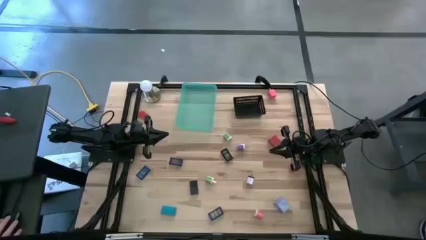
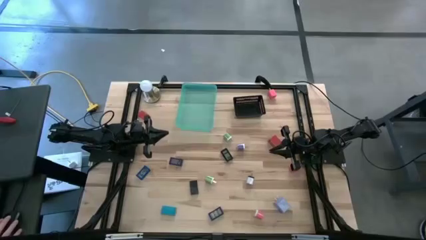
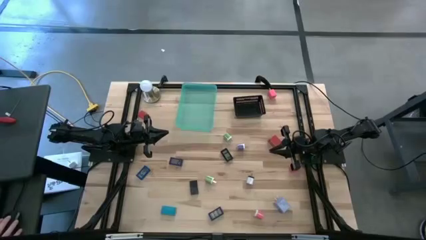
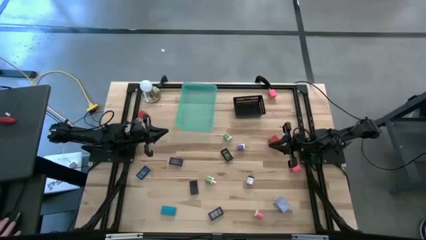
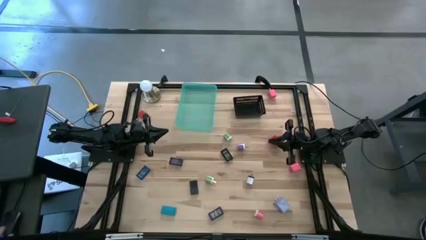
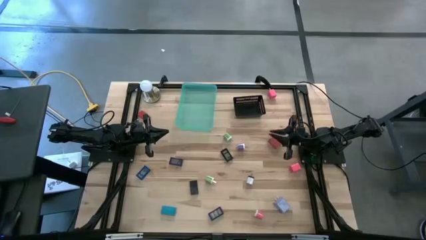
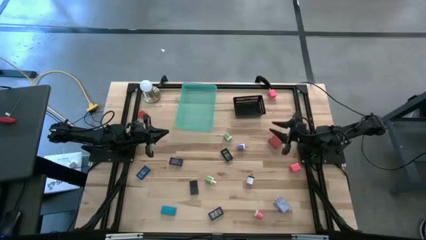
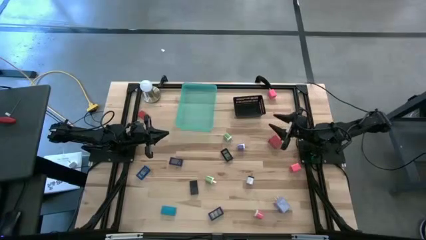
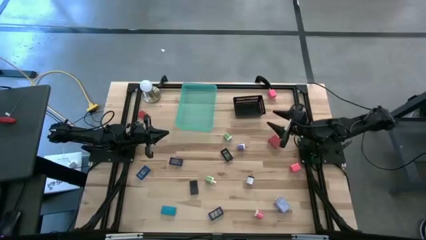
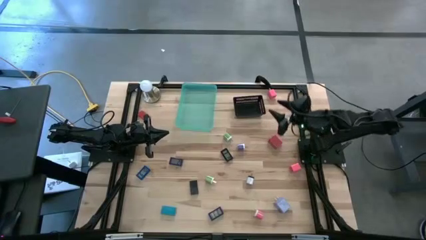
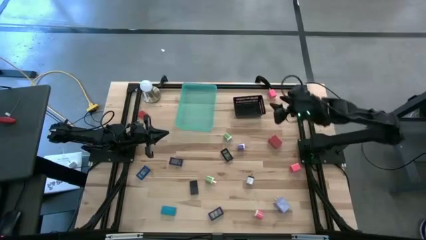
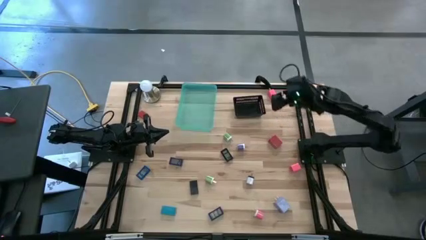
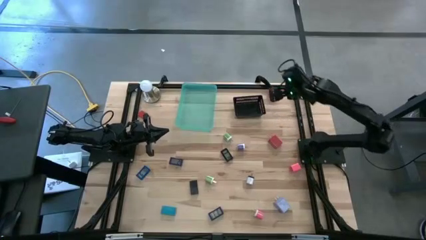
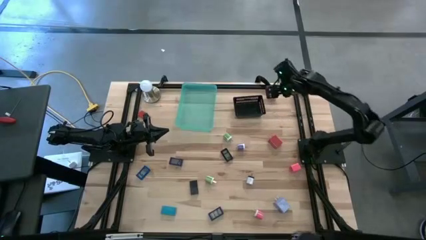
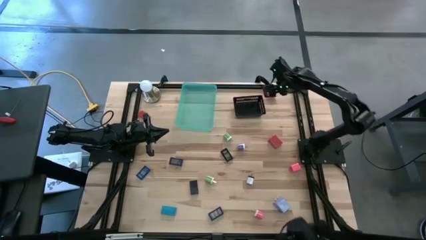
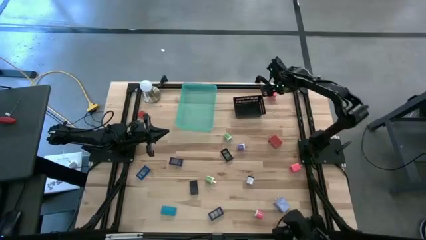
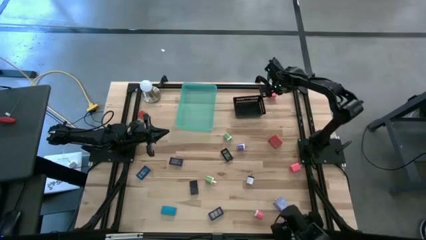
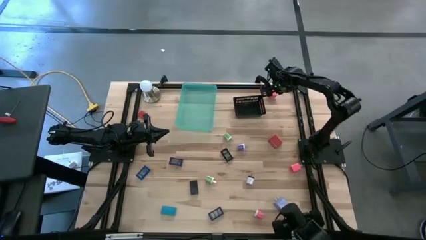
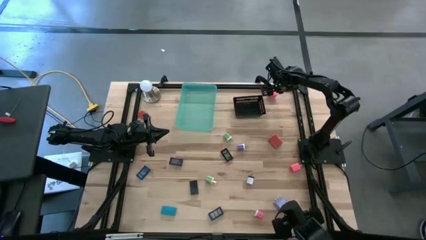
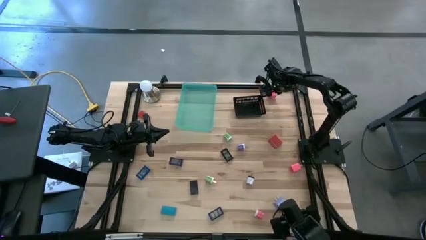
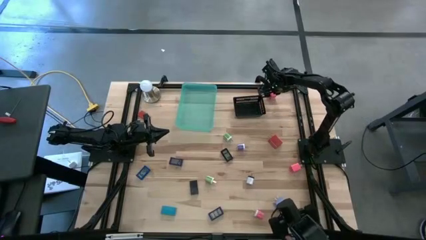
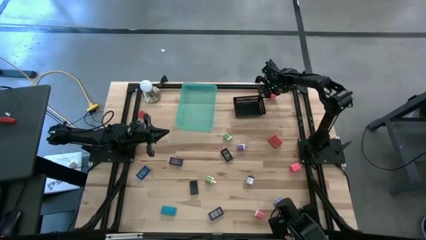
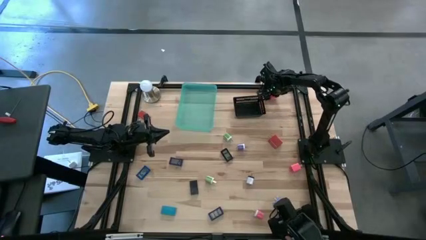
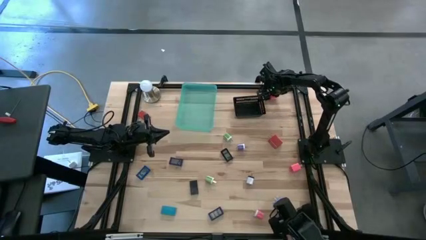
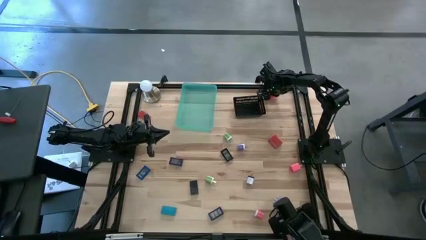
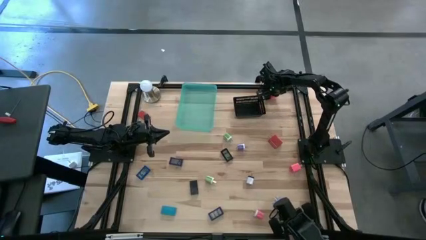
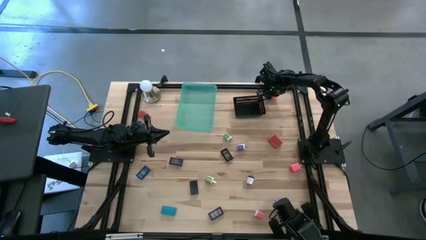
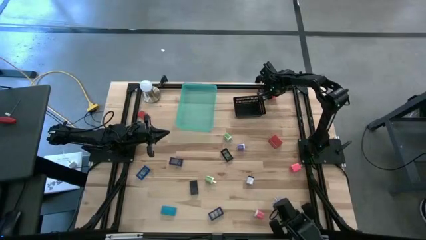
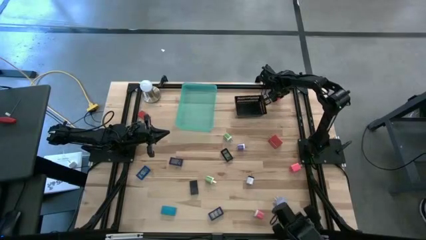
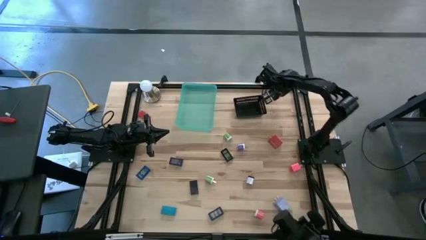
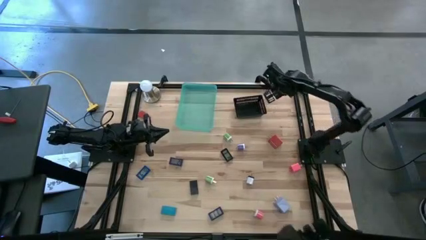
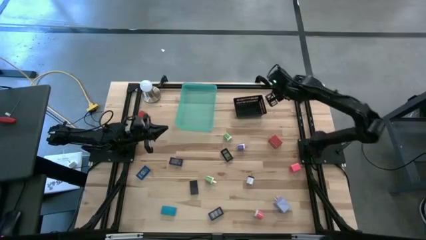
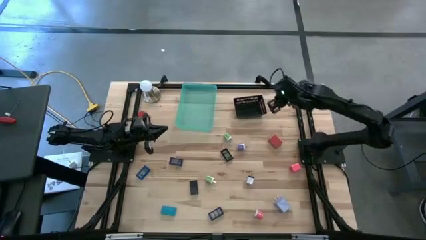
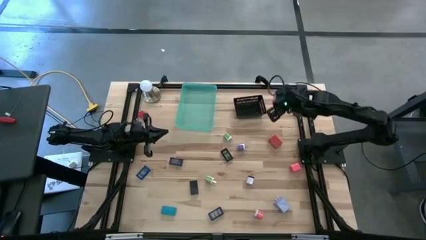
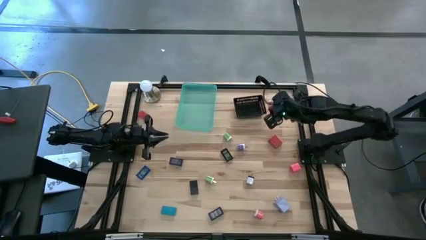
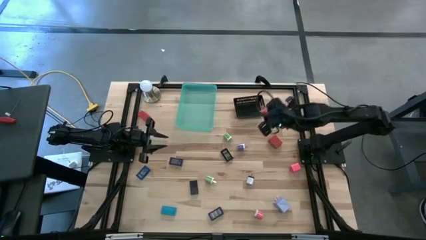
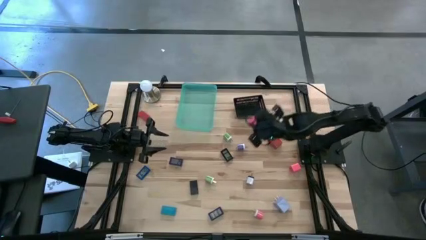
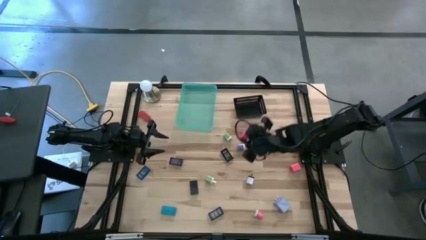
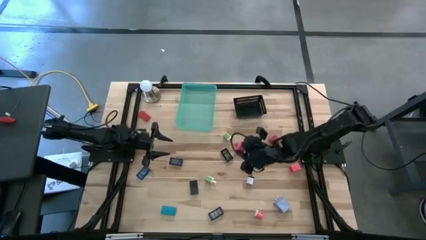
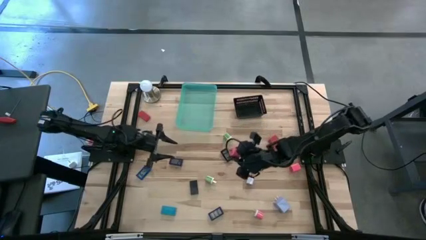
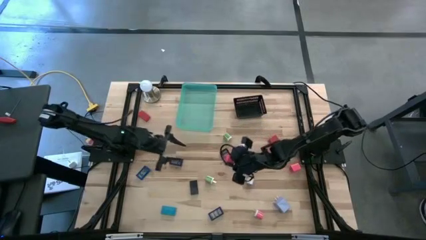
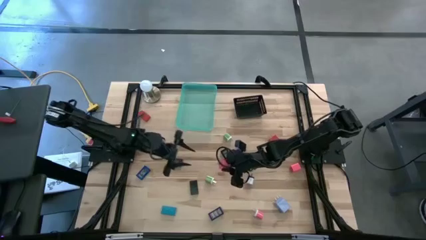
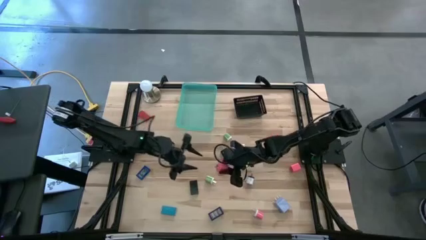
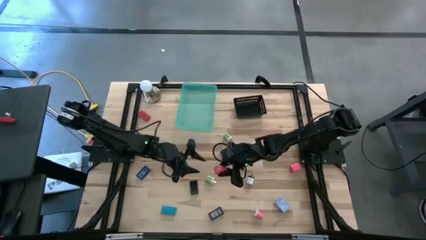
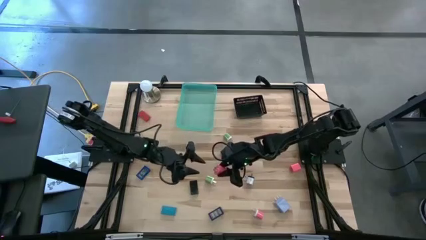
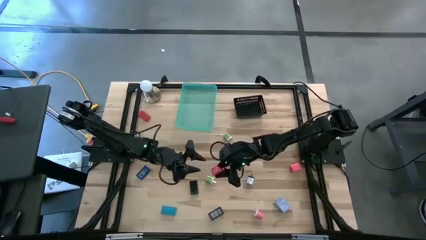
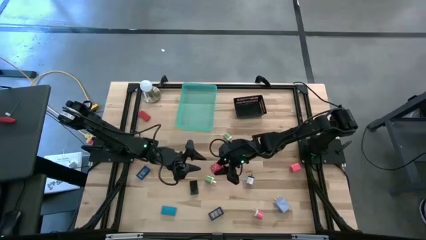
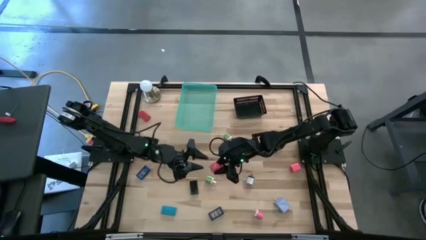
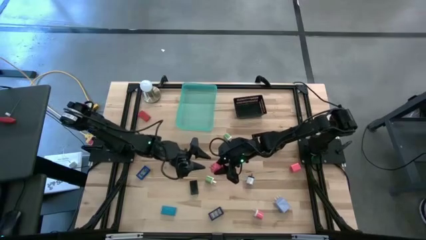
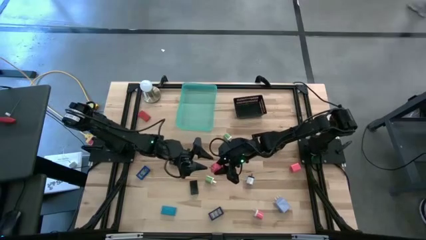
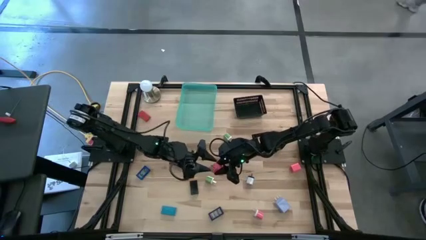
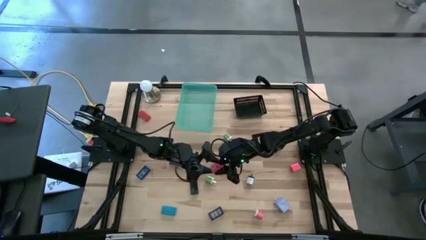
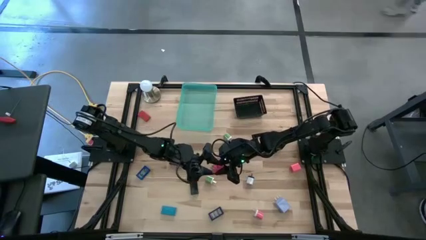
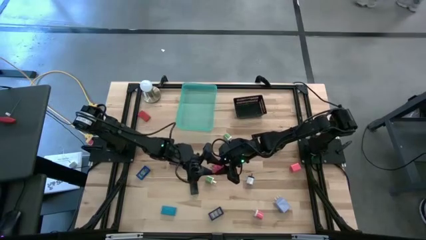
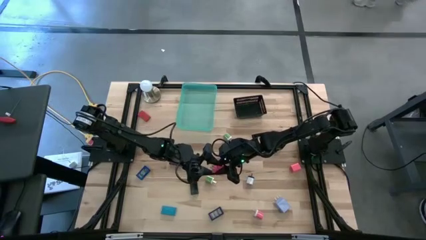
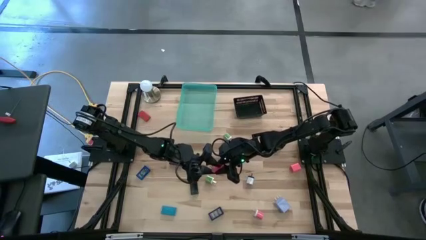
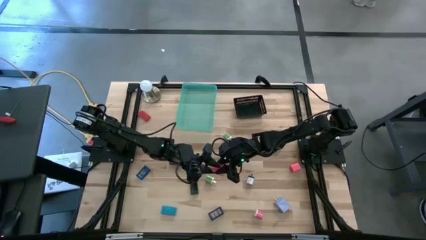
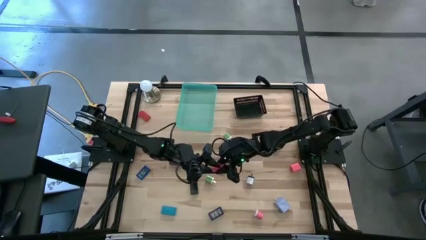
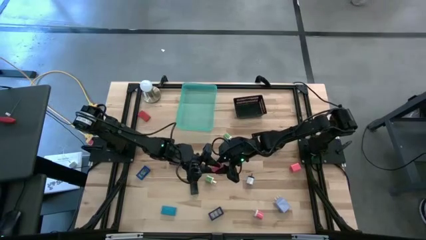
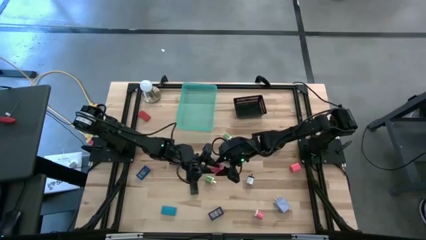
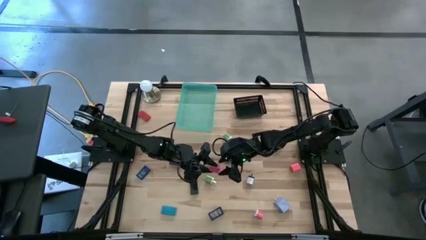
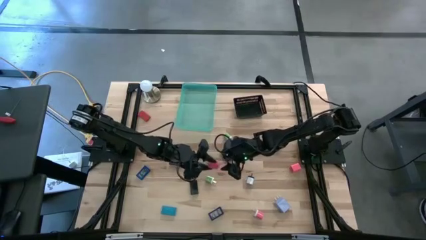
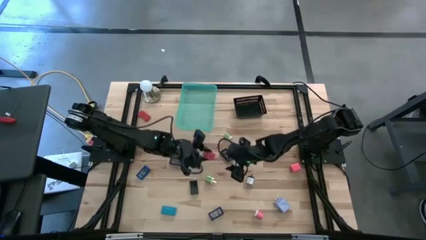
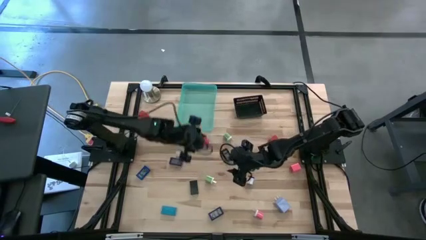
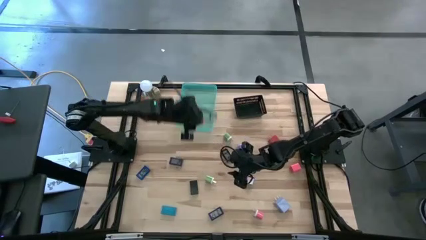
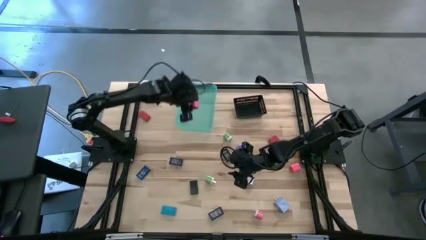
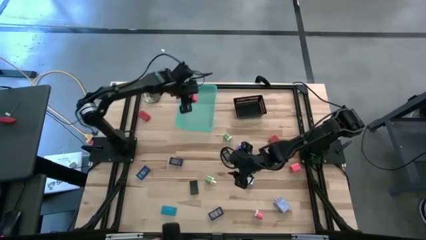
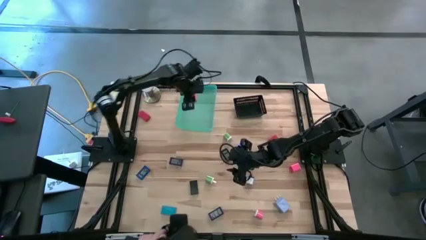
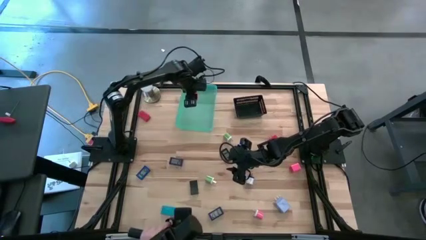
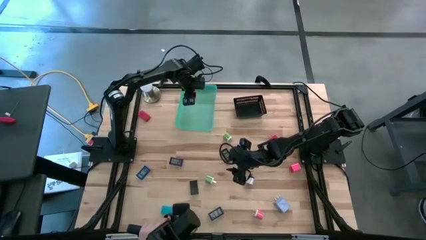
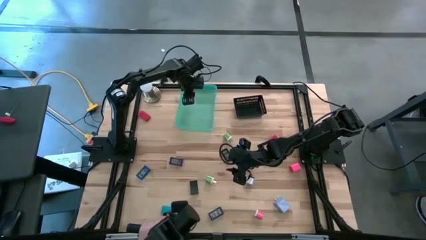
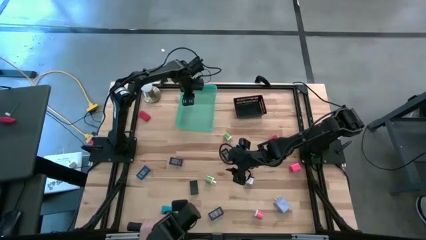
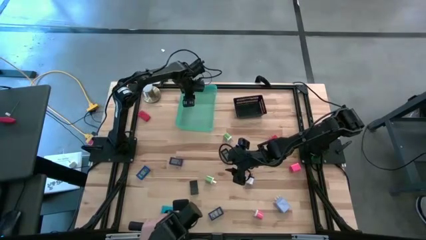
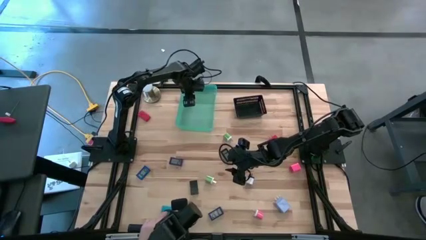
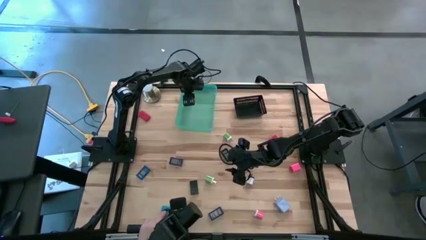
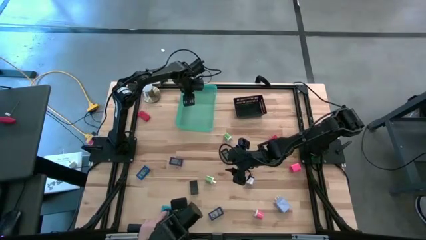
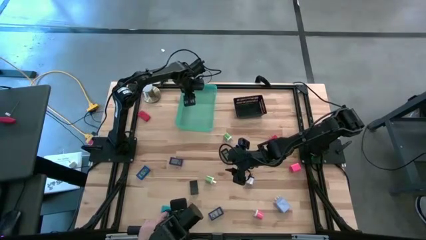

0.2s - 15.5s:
Task: Pick & Place Office items
Put the top pink charger adapter into the green bin
